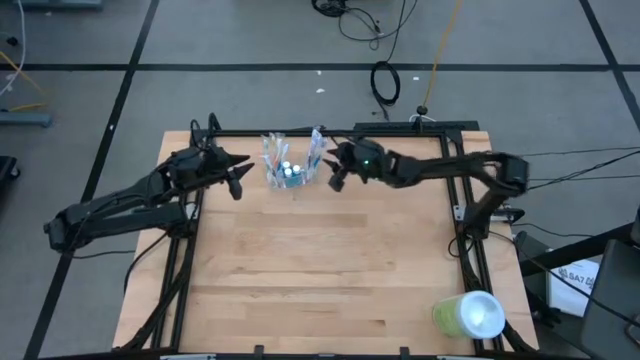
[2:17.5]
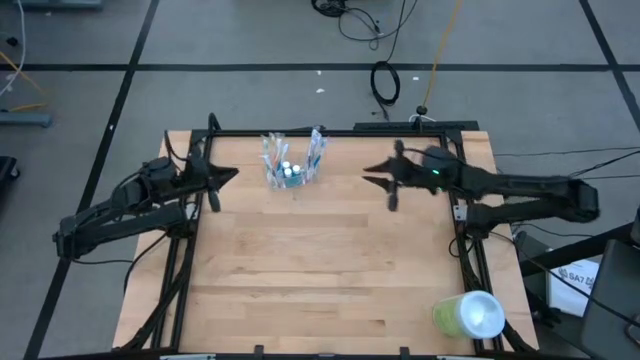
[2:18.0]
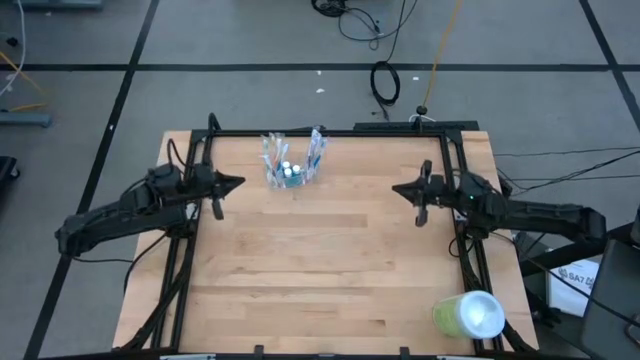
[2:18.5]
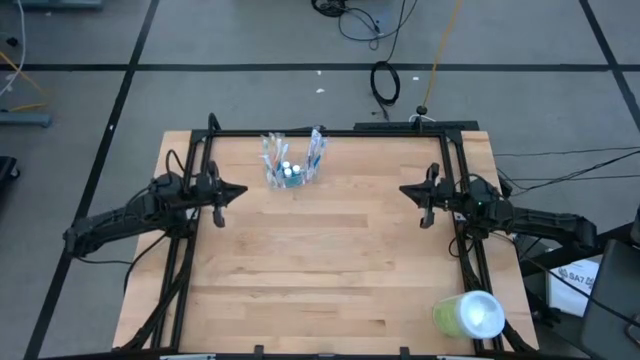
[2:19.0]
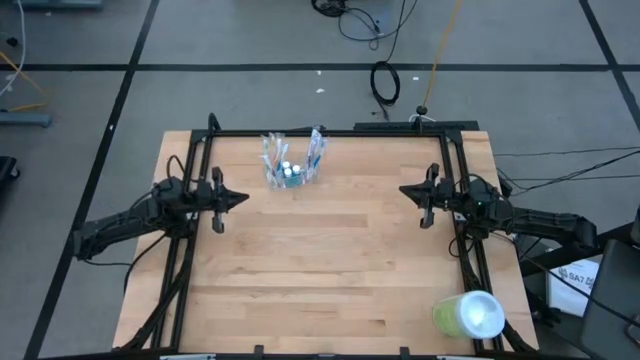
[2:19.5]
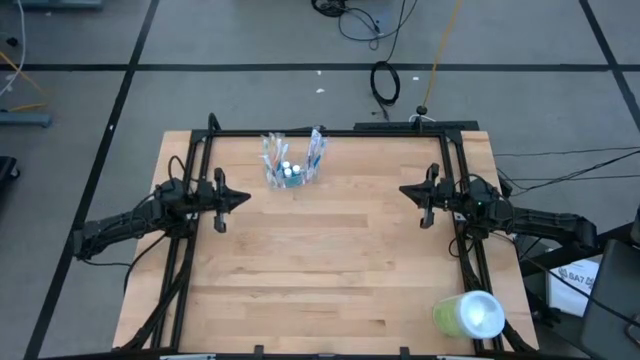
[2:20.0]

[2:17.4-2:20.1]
Task: Pick & Place toothbrushing station
Return to Home Position

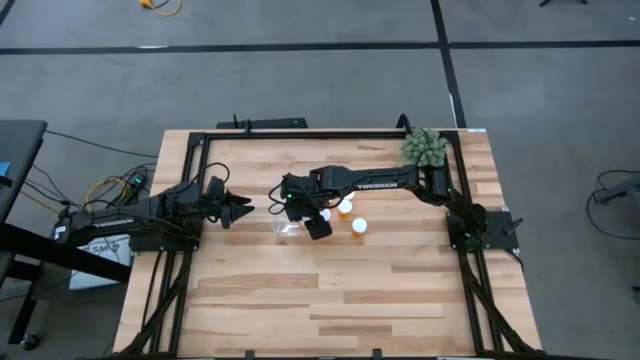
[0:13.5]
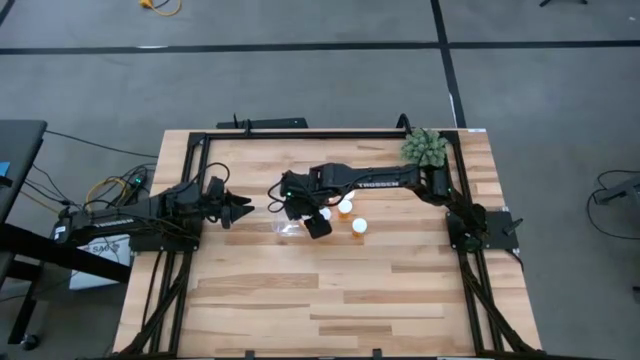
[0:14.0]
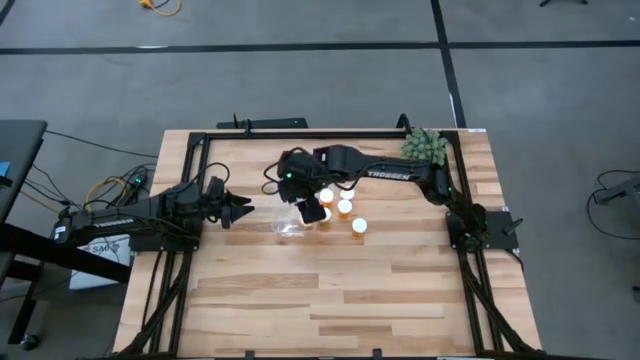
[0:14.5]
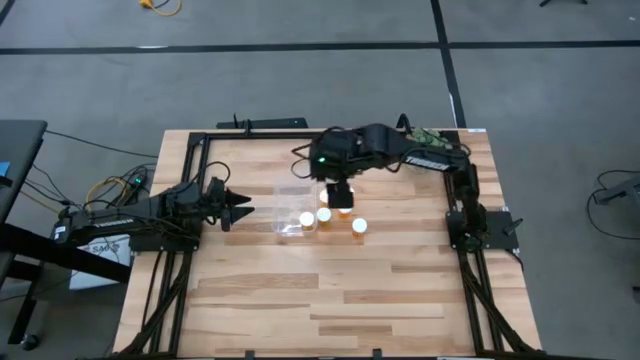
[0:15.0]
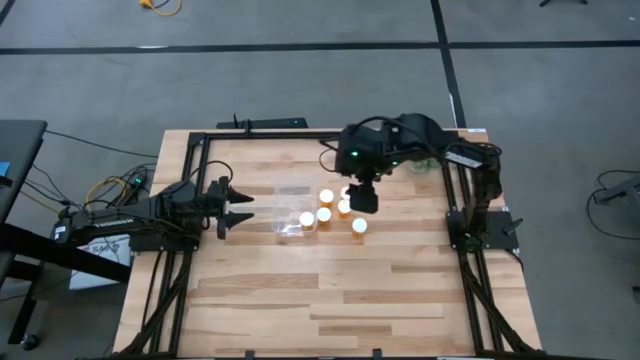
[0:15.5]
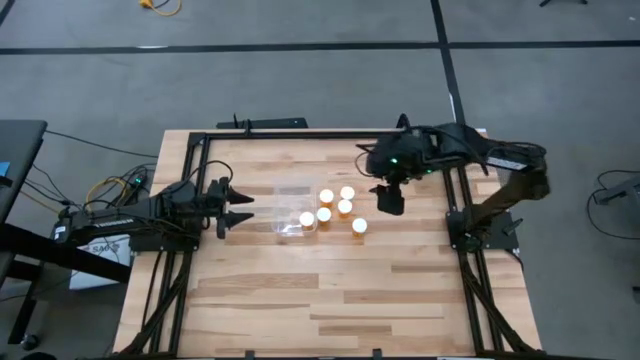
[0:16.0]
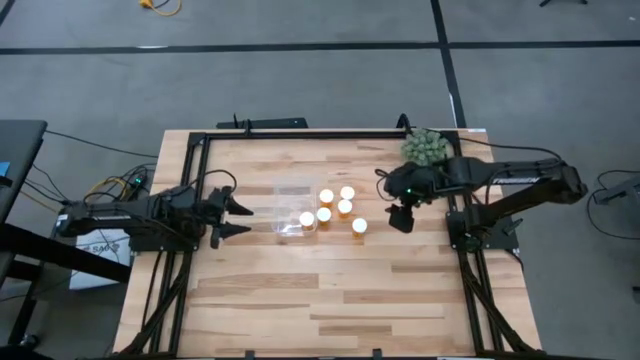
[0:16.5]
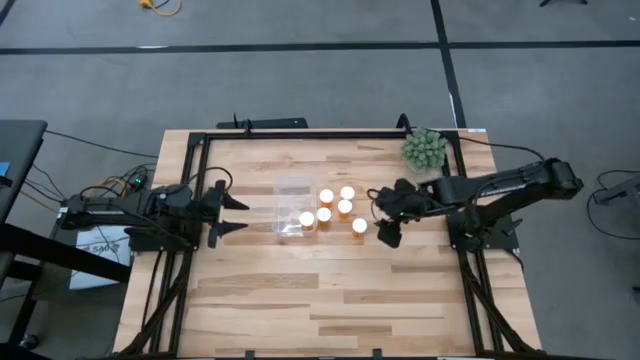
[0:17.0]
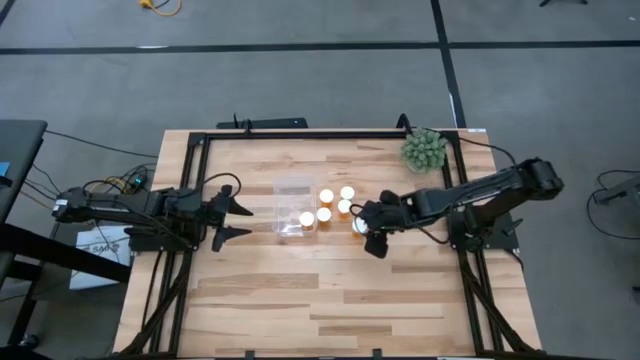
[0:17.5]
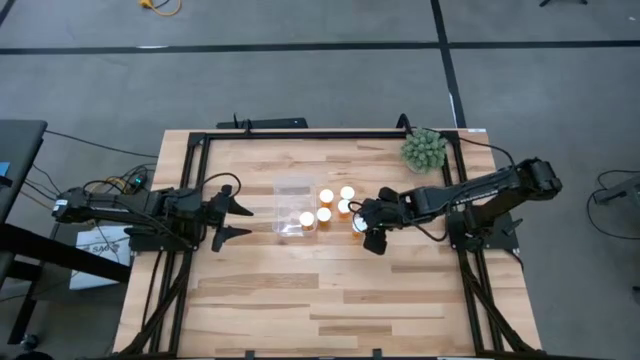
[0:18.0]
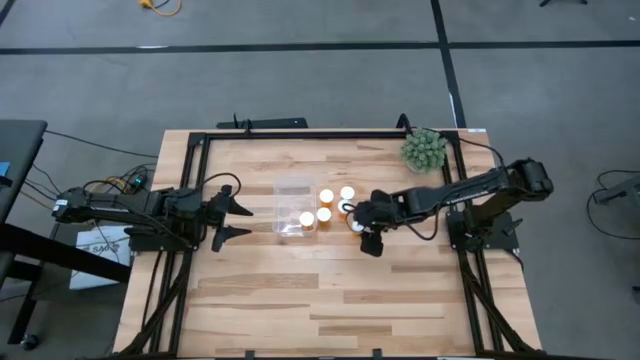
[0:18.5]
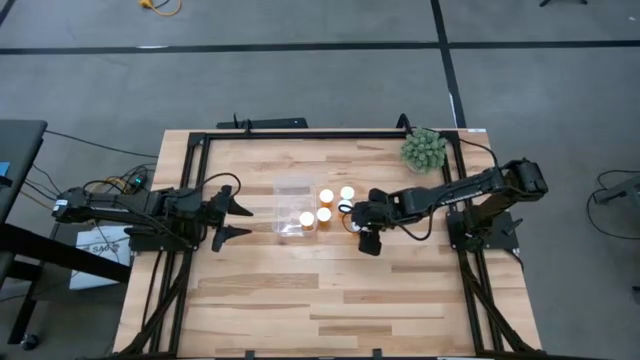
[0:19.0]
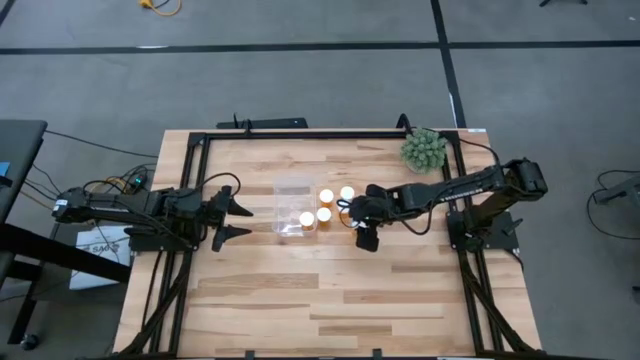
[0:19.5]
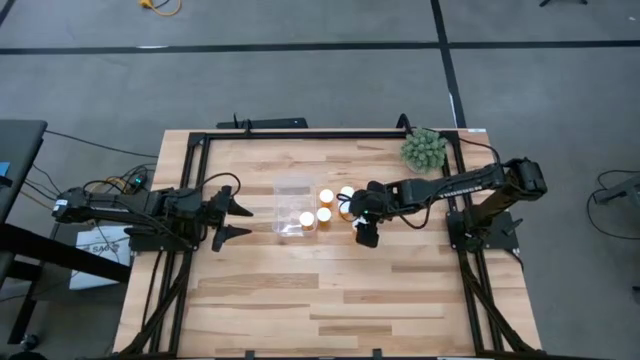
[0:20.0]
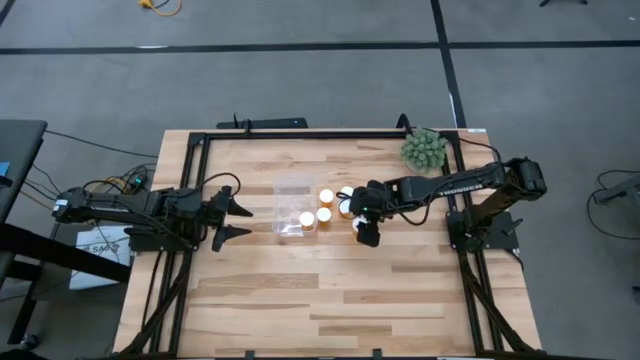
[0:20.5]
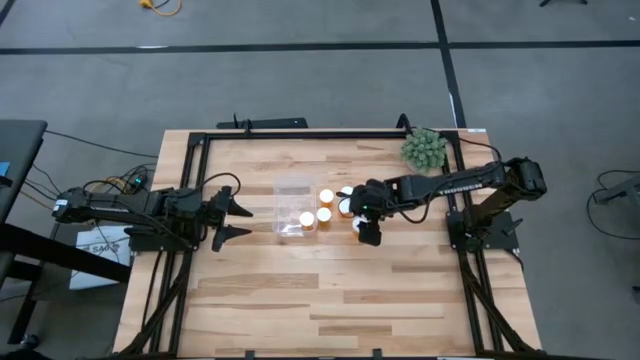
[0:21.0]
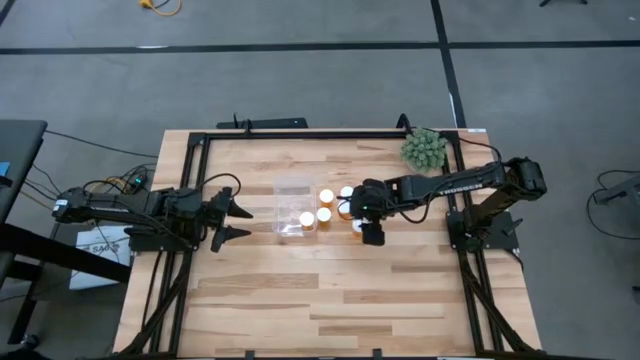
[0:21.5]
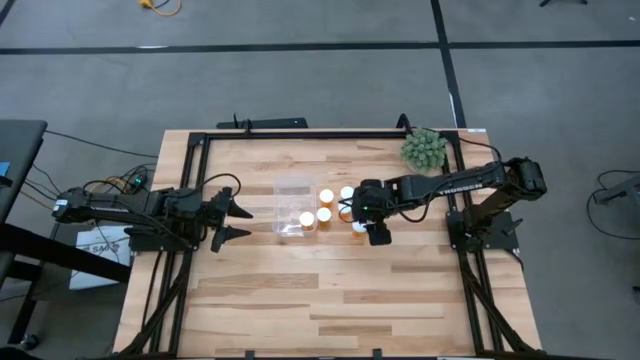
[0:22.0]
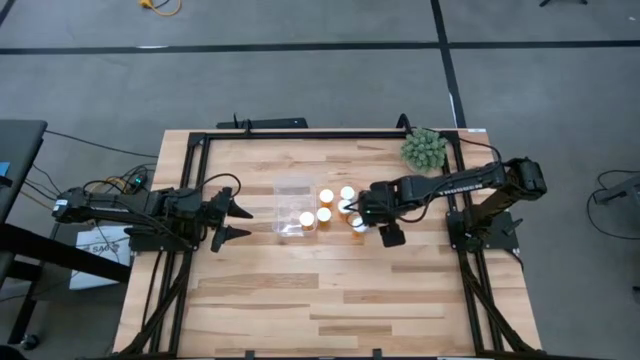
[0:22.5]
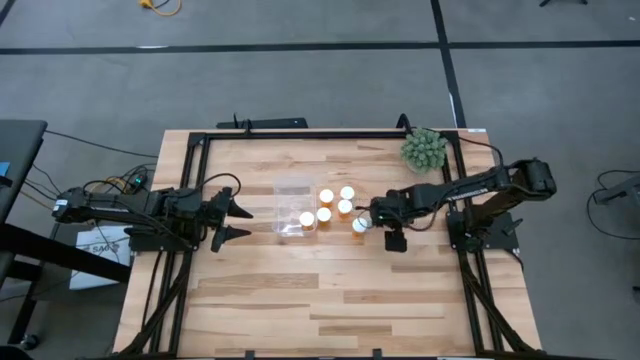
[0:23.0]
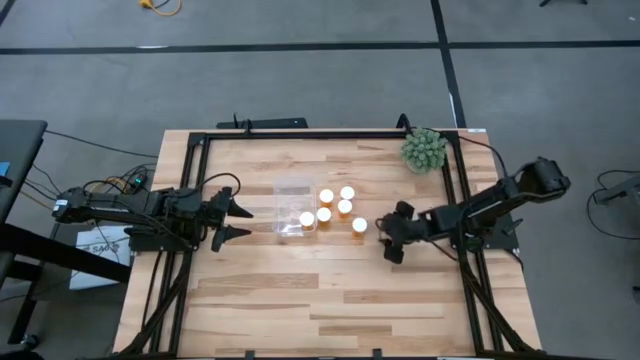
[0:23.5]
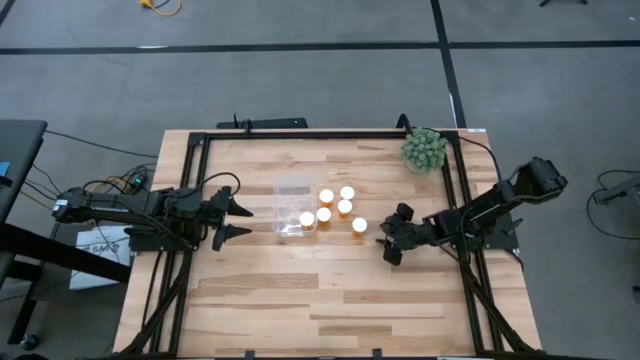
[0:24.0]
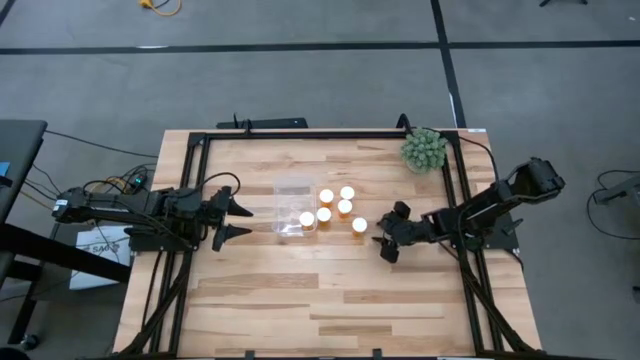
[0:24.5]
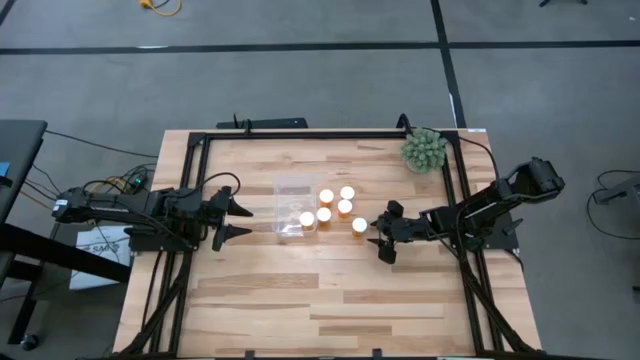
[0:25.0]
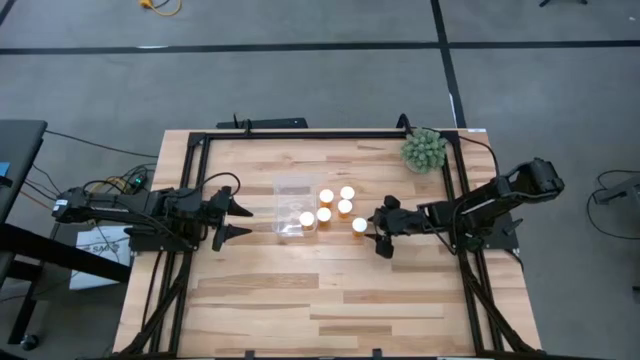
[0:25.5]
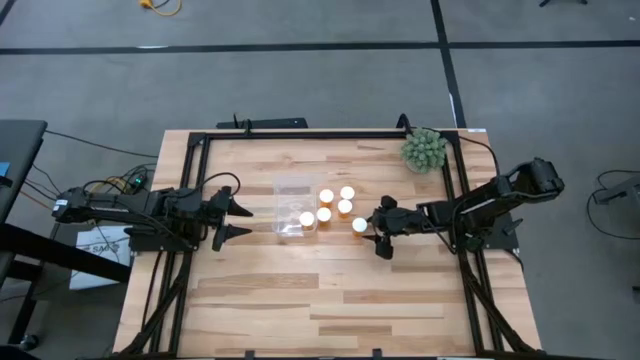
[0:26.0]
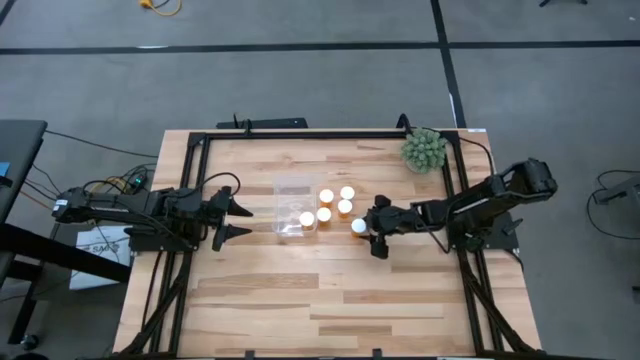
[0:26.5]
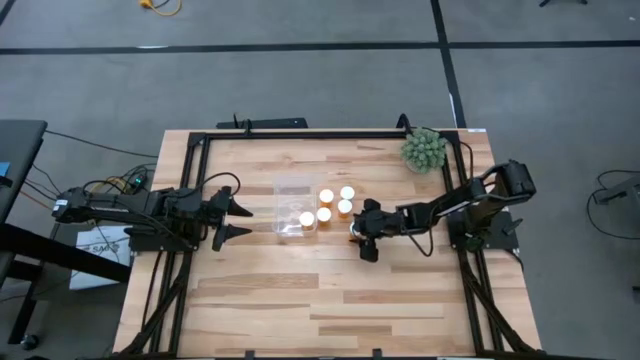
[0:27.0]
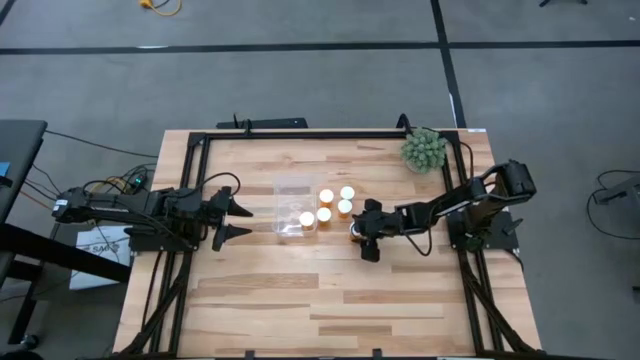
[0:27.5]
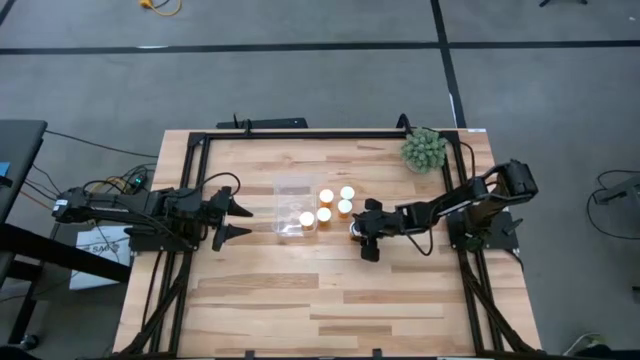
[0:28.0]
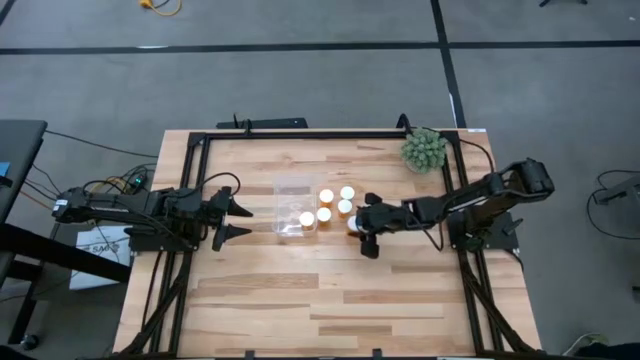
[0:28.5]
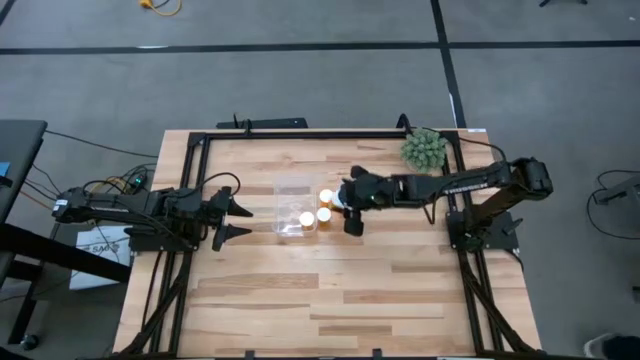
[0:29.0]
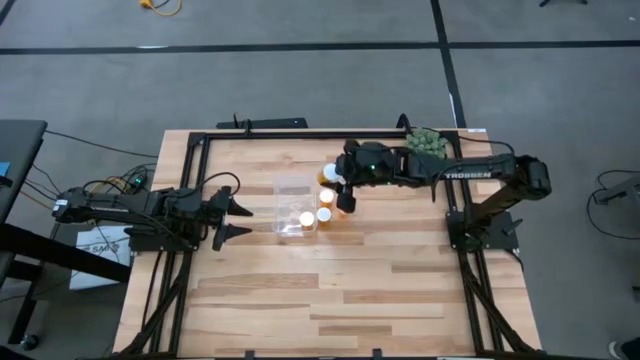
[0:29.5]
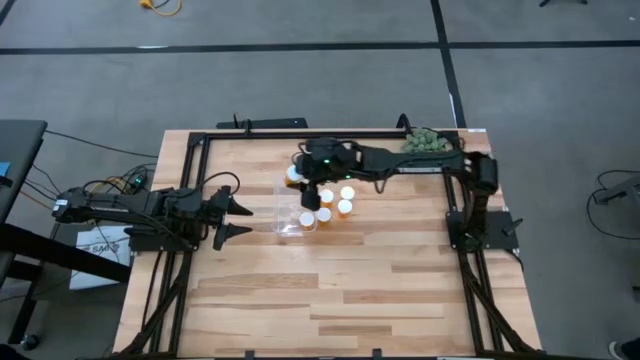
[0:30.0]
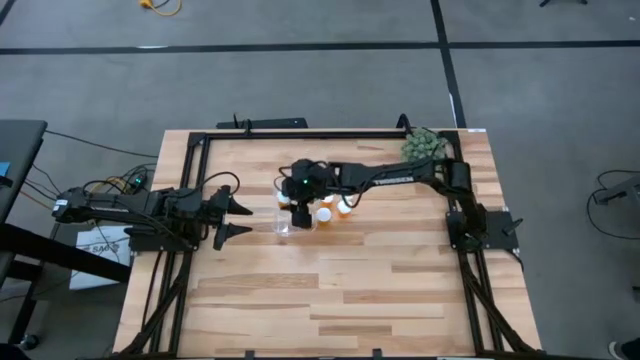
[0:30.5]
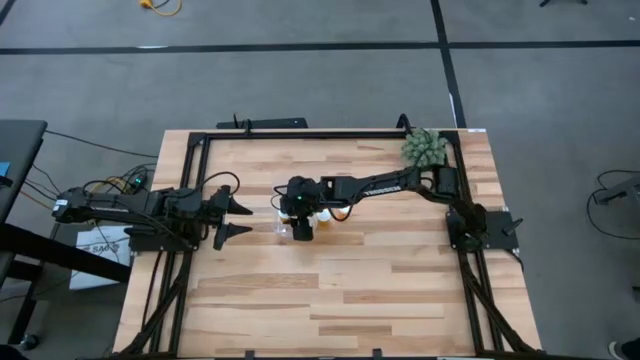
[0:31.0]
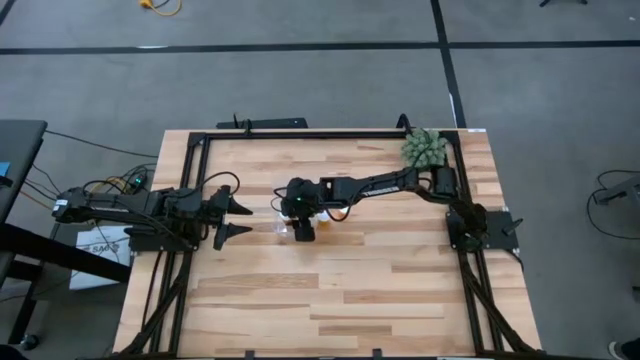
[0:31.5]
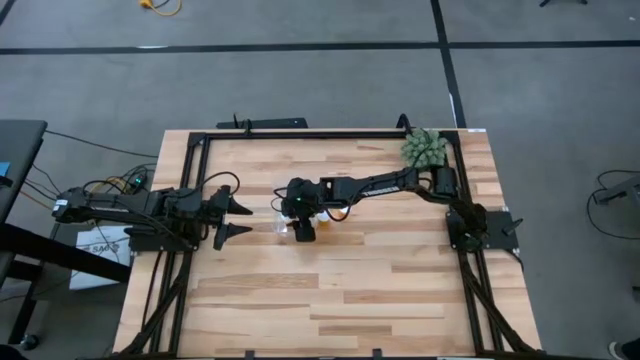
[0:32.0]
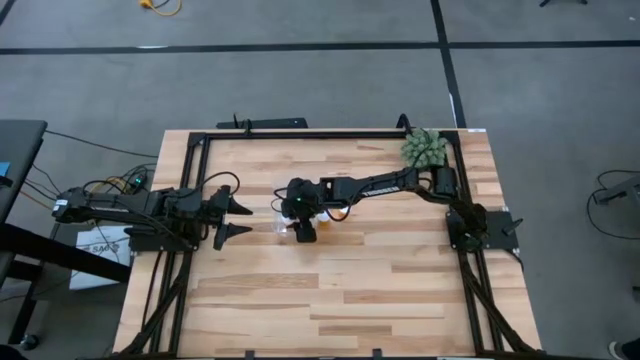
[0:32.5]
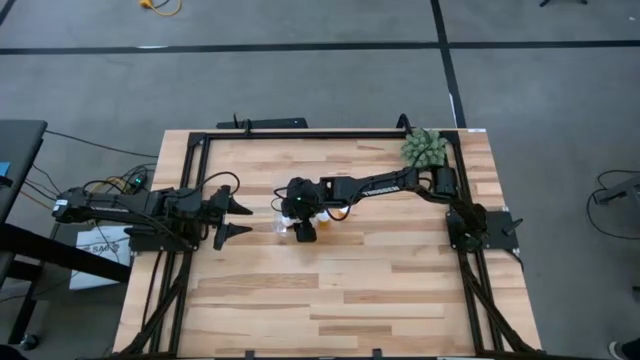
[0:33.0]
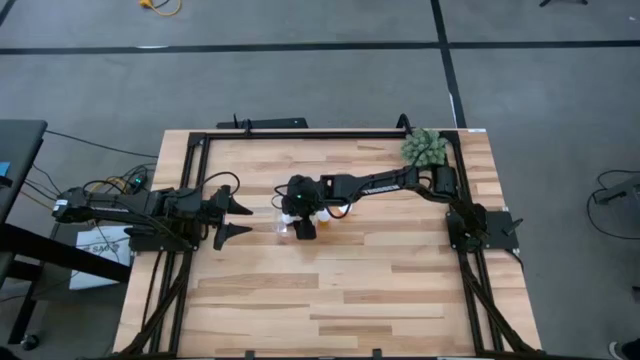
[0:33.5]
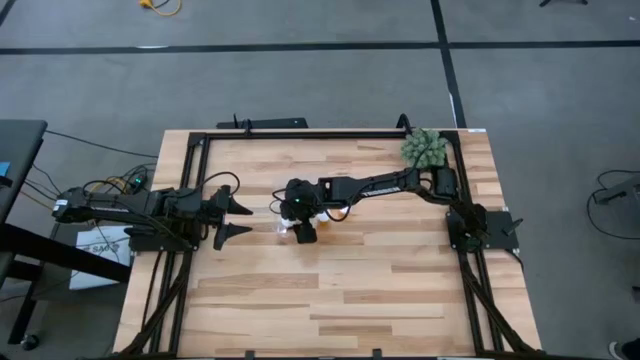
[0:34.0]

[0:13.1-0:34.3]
Task: Pick and place pill bottles into a basket
Put the orange pill bottle into the transparent container
